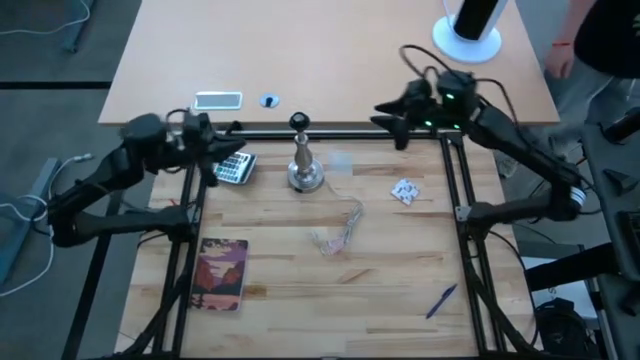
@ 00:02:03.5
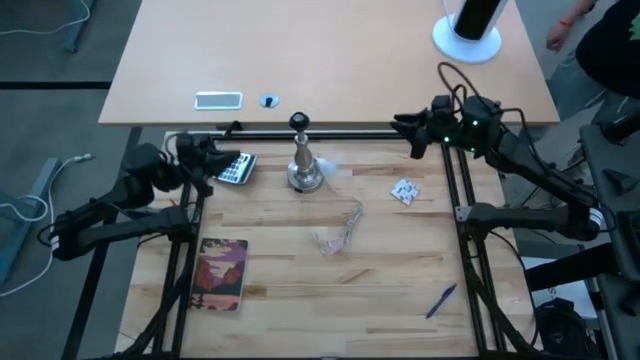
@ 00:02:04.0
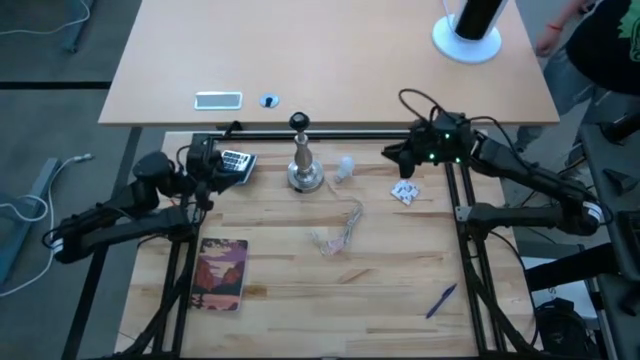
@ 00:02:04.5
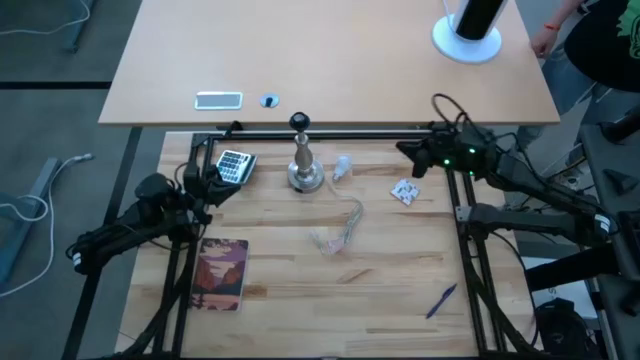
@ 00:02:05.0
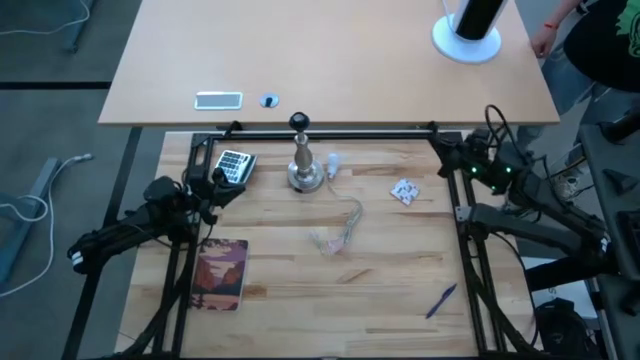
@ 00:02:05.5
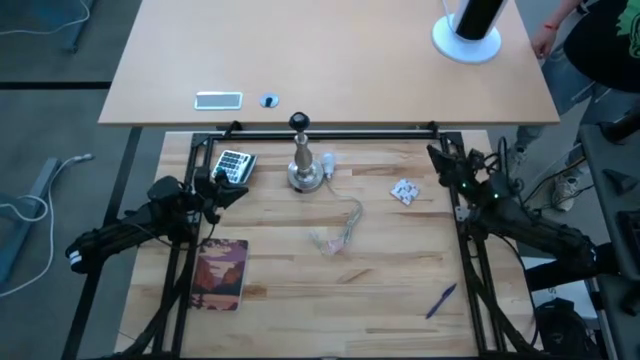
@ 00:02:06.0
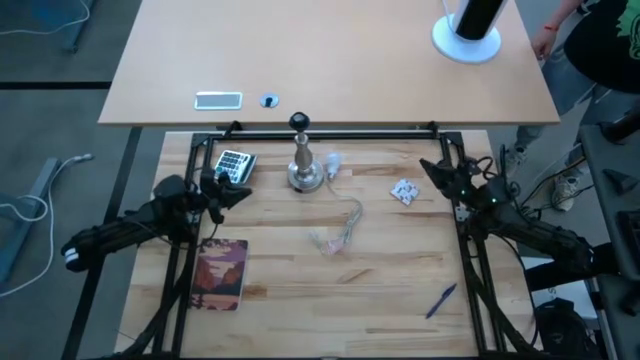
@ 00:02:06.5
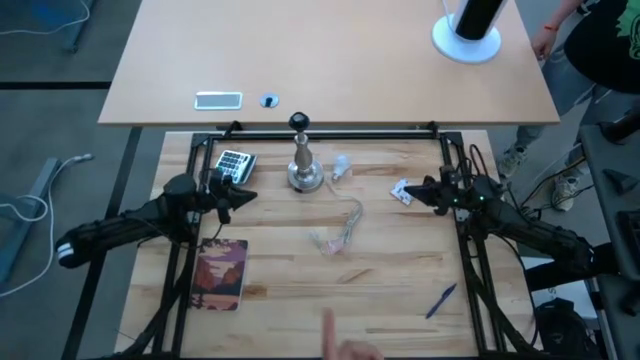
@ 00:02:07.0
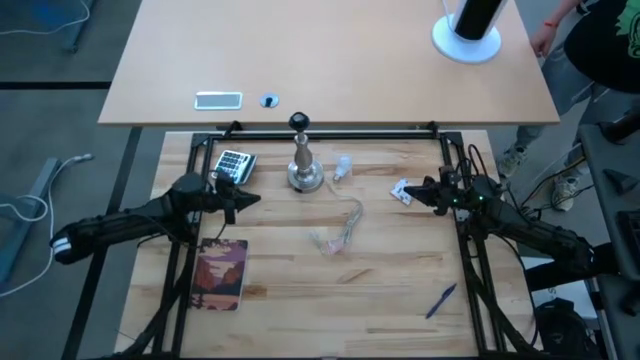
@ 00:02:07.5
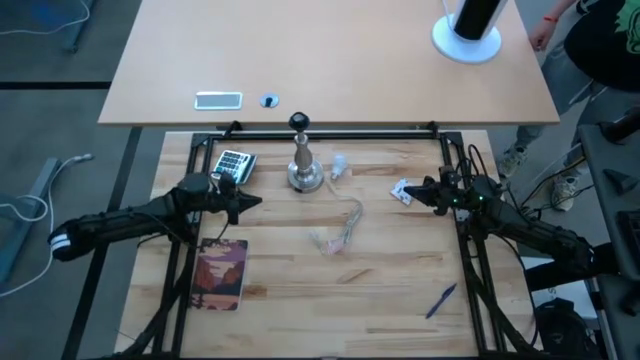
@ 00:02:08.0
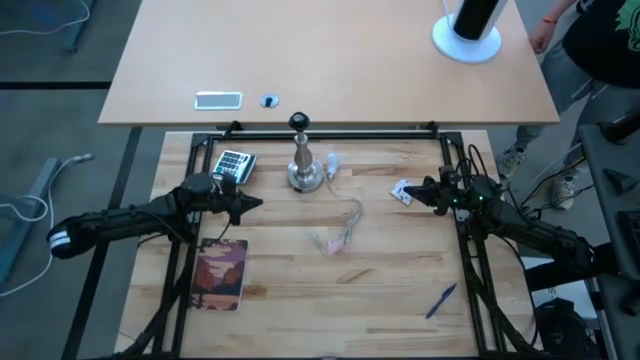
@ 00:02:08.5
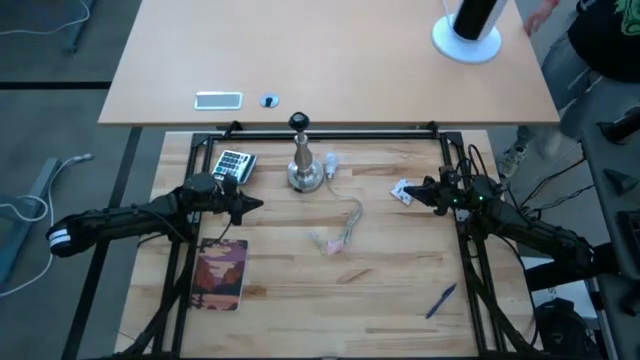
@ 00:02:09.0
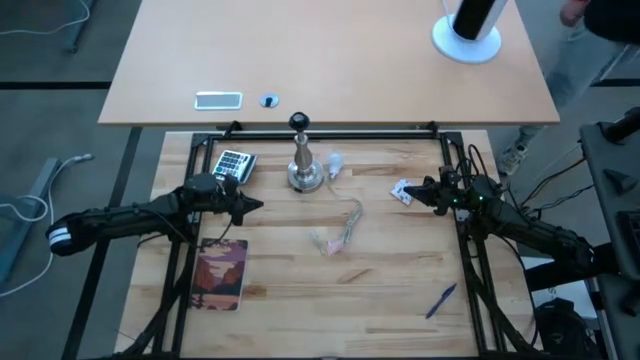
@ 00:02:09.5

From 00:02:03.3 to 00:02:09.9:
Task: Screw lightbulb
Return to Home Position

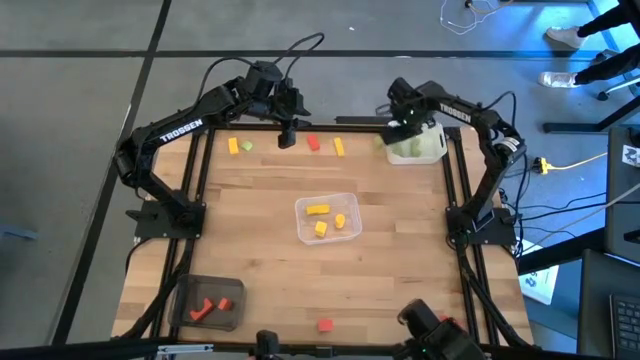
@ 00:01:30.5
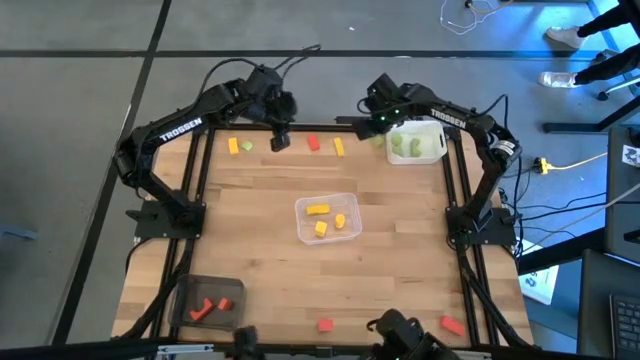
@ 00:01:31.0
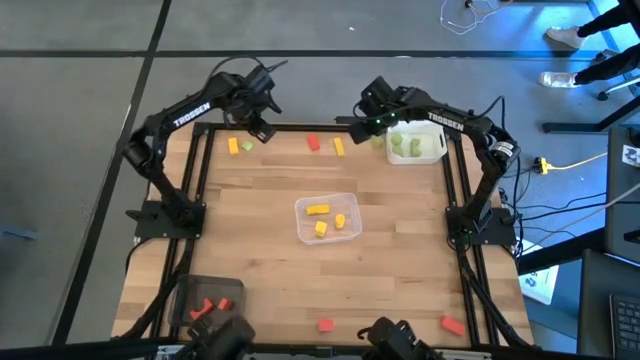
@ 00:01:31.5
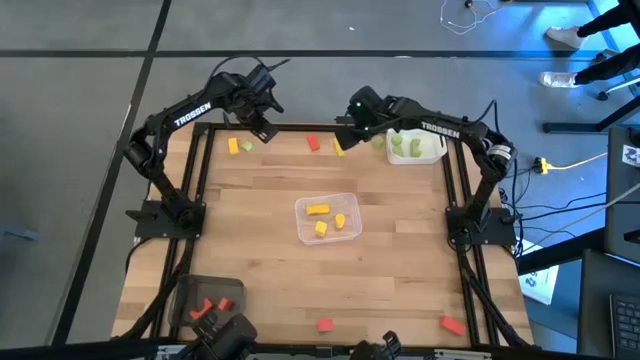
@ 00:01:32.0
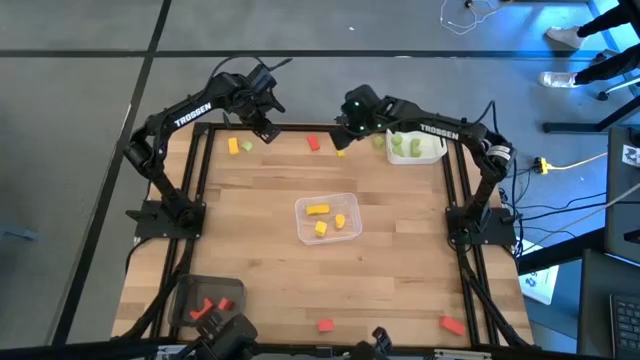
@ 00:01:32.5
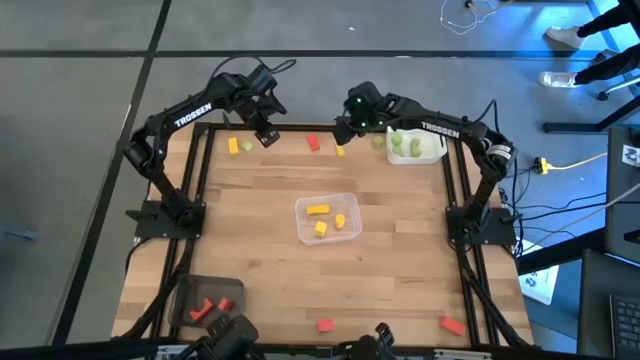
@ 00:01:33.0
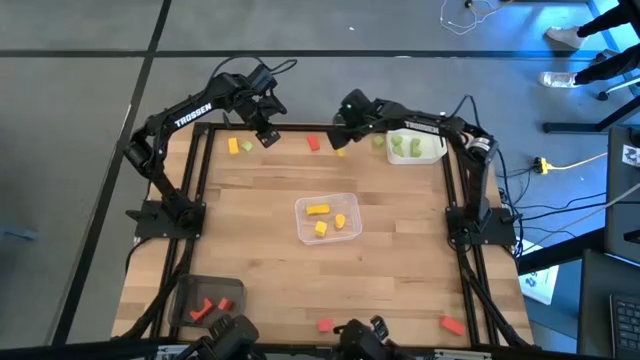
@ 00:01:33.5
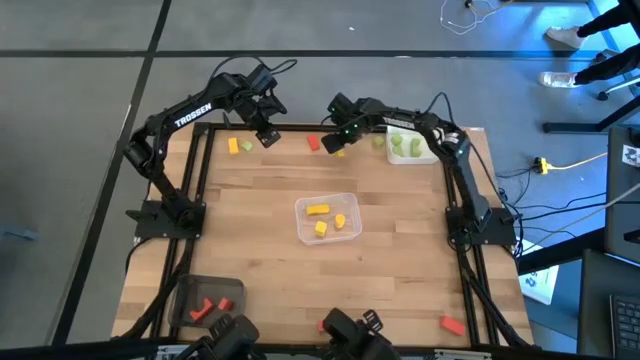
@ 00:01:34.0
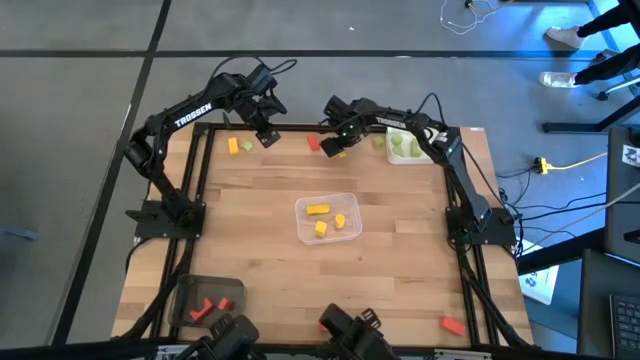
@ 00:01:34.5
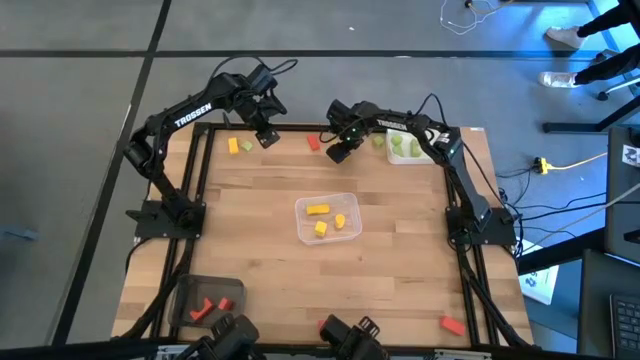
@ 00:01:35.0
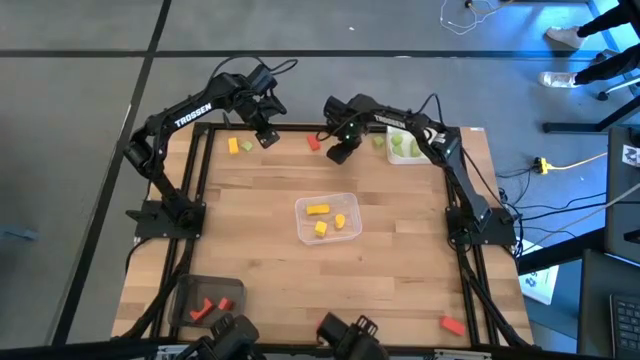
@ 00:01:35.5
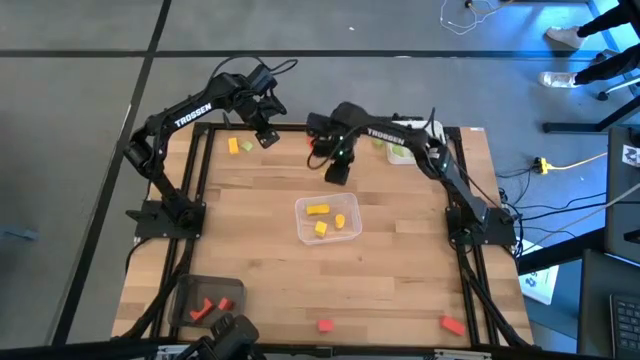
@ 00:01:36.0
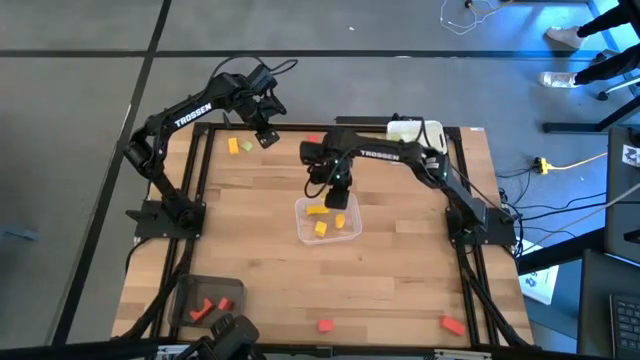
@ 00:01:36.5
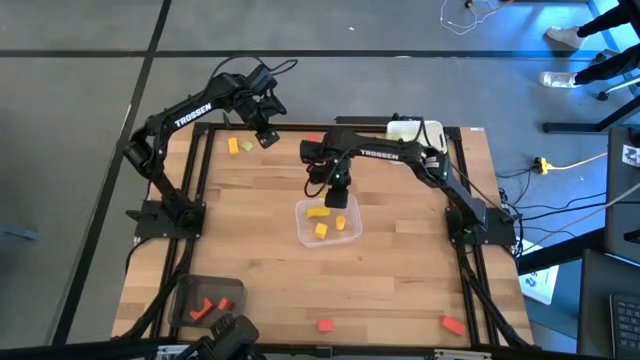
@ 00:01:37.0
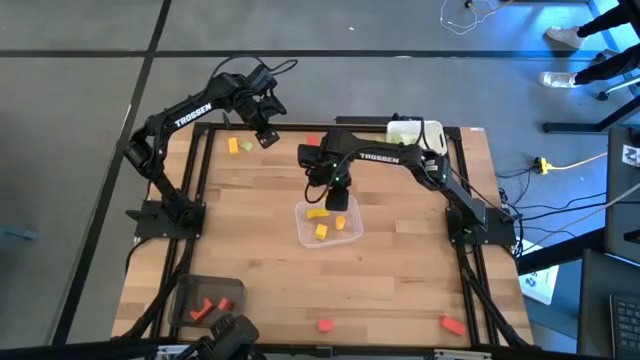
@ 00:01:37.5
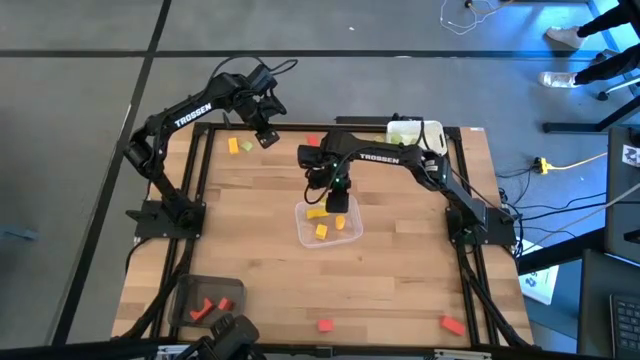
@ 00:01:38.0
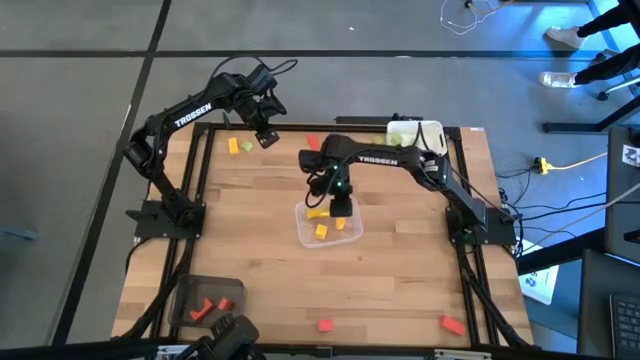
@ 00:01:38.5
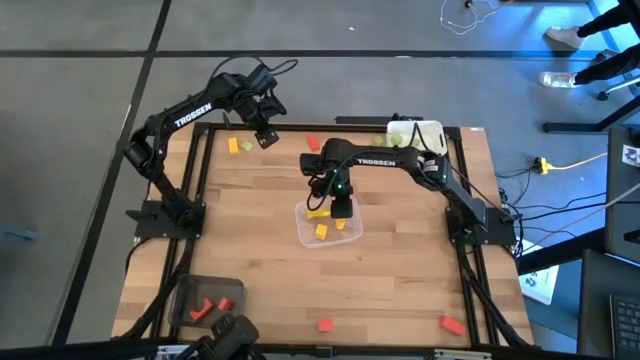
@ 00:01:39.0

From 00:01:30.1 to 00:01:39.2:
Task: Sort & place blocks by color
Put the yellow block into the transparent bin

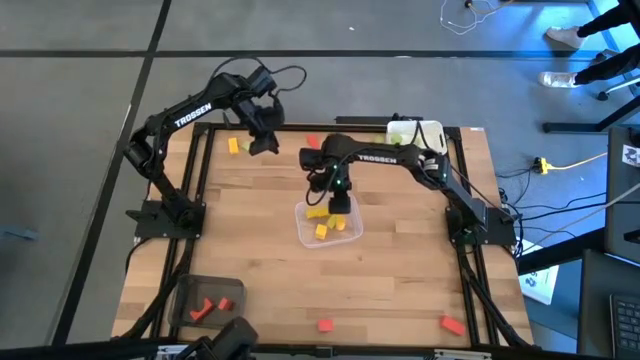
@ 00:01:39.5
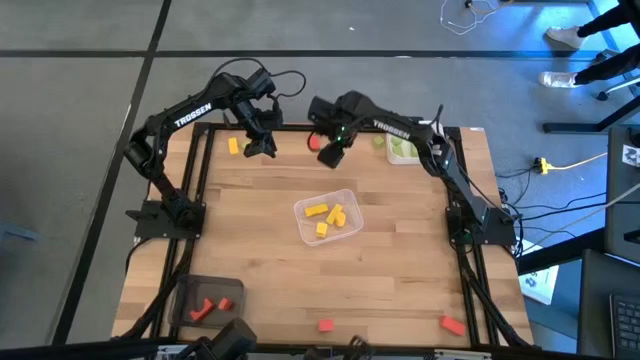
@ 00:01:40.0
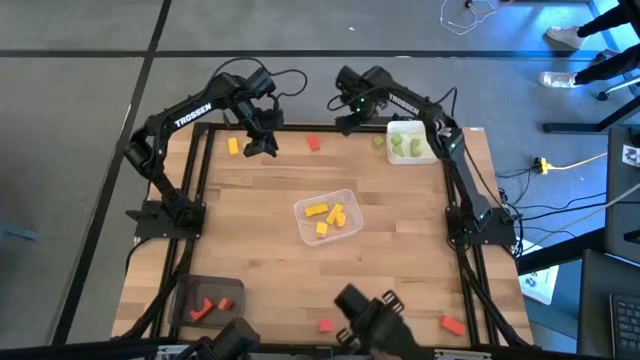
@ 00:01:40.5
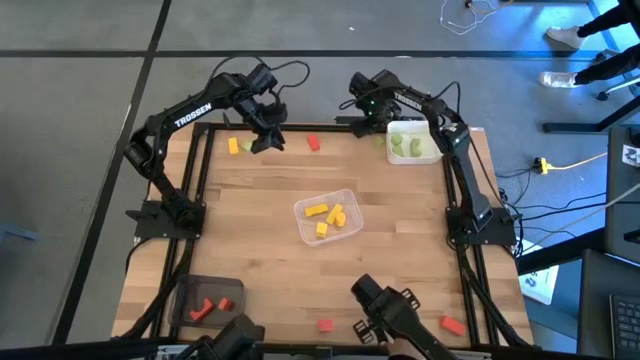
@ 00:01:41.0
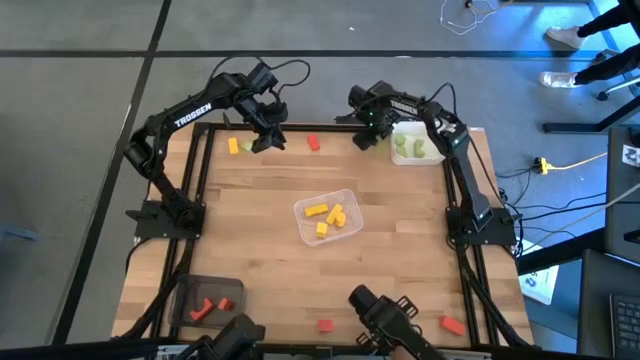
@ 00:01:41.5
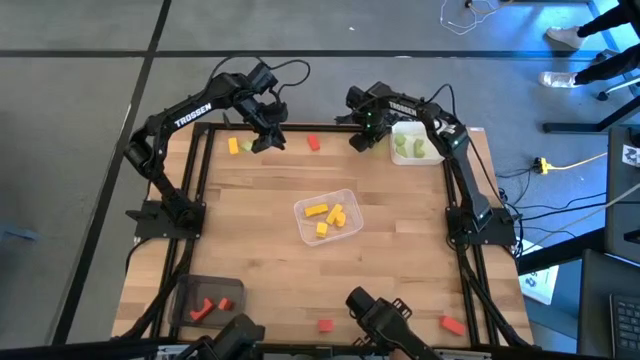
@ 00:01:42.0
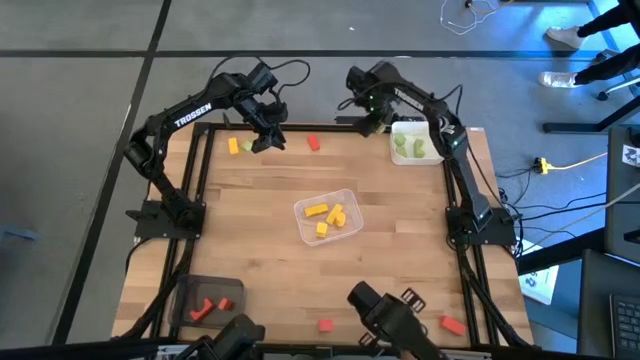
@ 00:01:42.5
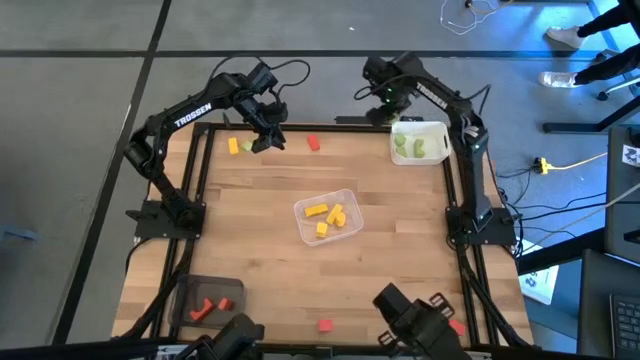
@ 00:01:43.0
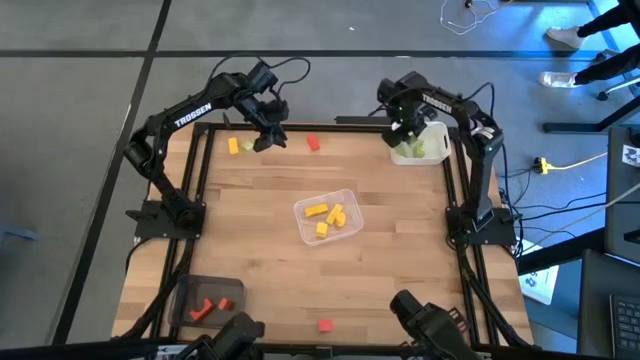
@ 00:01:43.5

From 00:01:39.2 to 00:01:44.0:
Put the green block into the white bin
